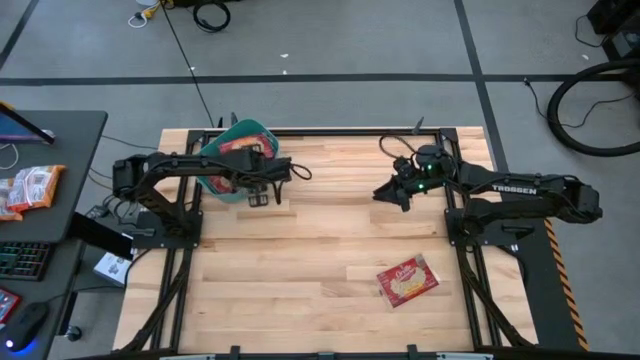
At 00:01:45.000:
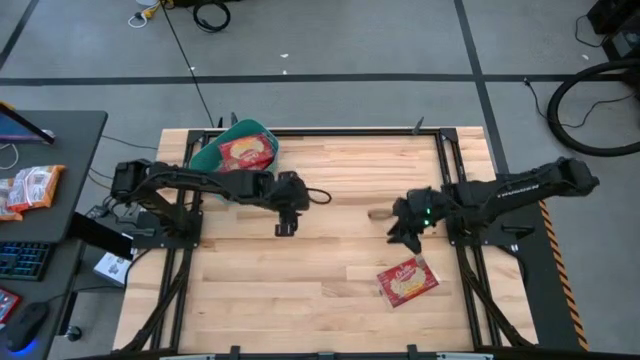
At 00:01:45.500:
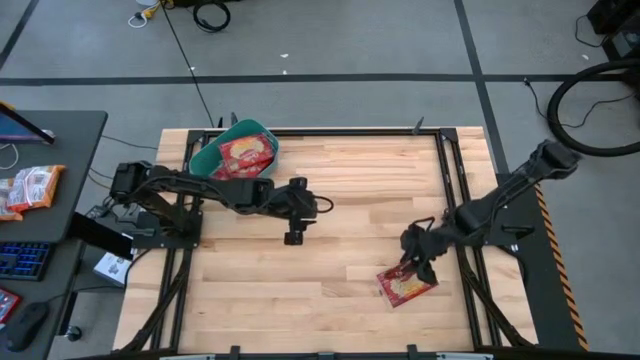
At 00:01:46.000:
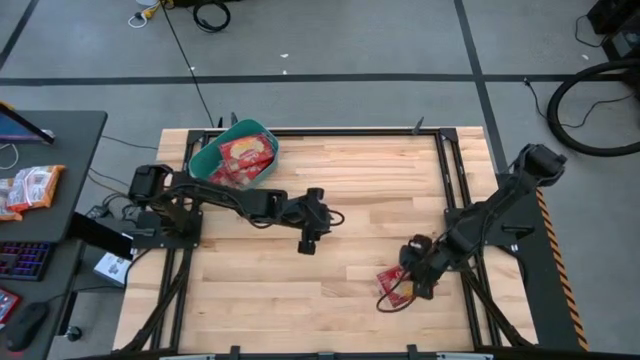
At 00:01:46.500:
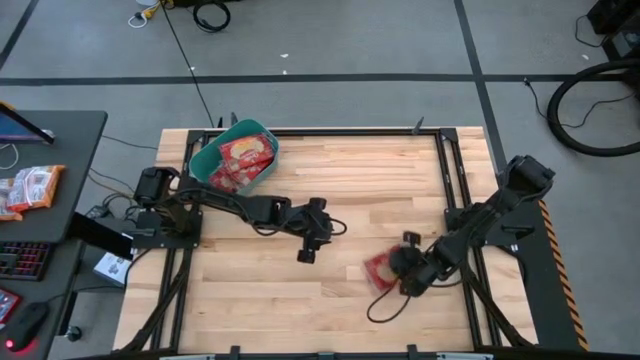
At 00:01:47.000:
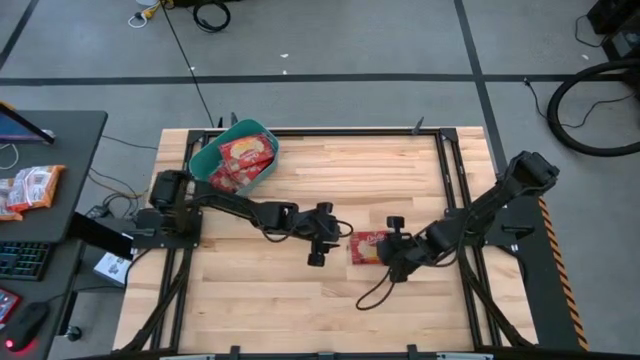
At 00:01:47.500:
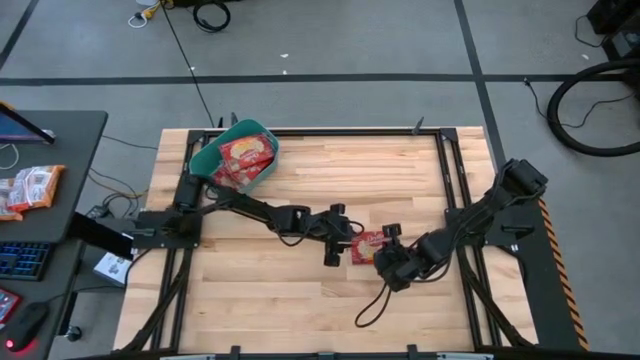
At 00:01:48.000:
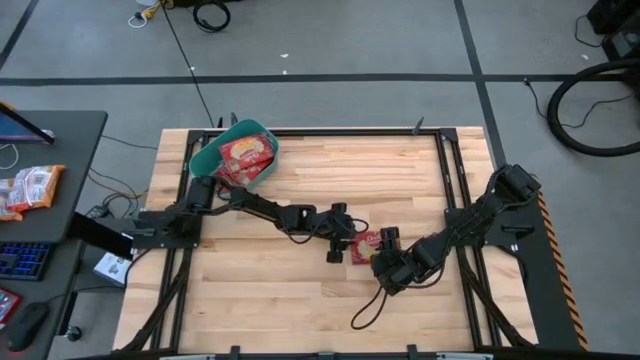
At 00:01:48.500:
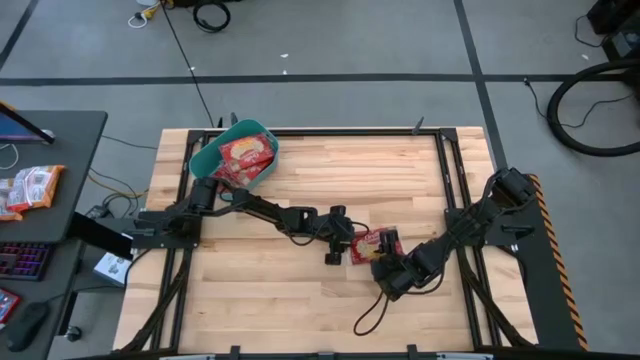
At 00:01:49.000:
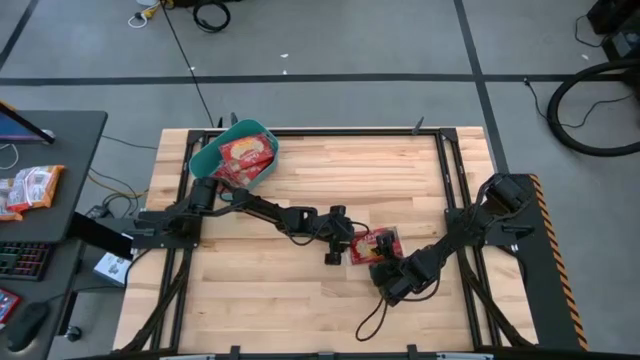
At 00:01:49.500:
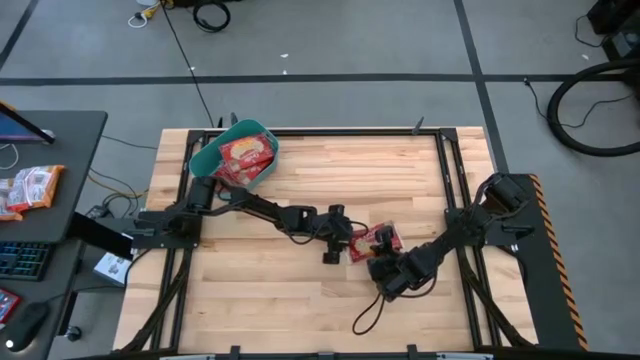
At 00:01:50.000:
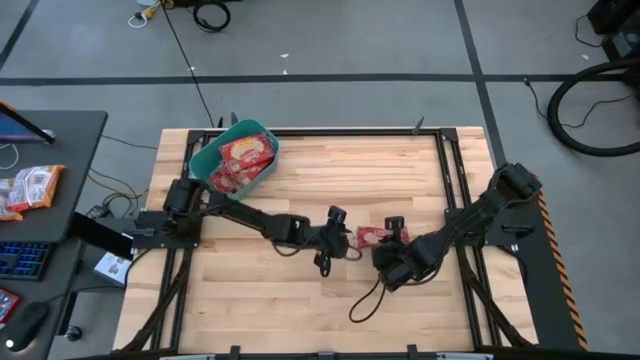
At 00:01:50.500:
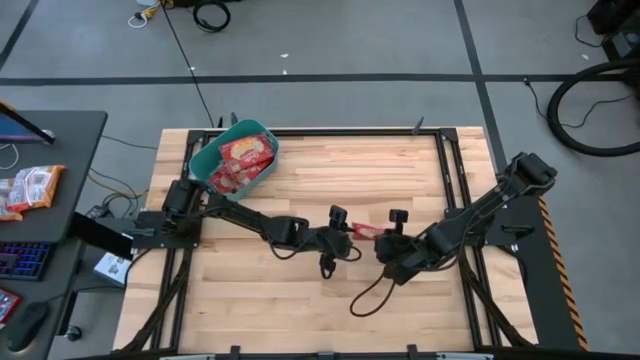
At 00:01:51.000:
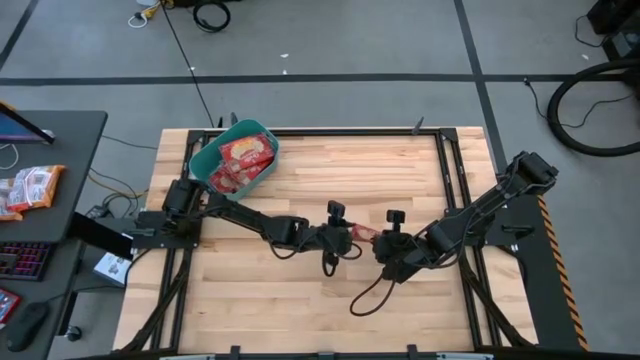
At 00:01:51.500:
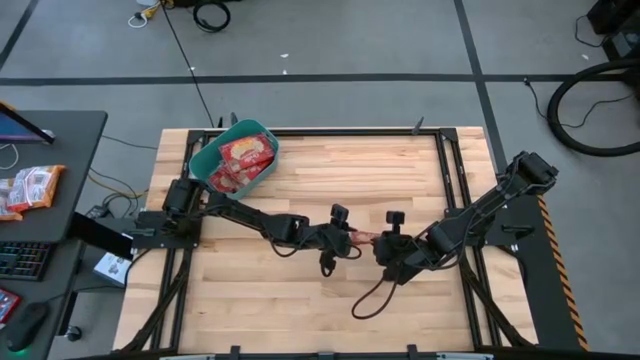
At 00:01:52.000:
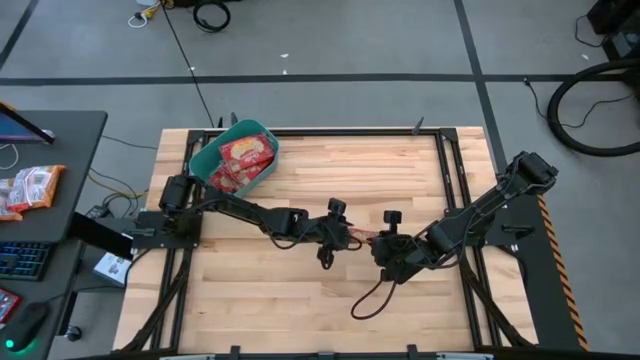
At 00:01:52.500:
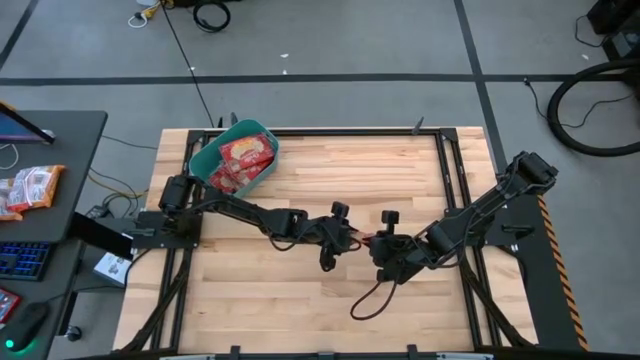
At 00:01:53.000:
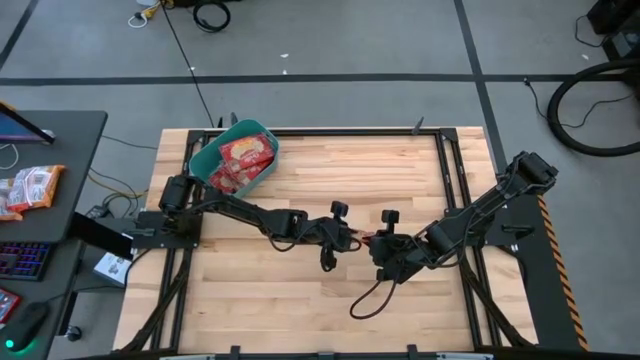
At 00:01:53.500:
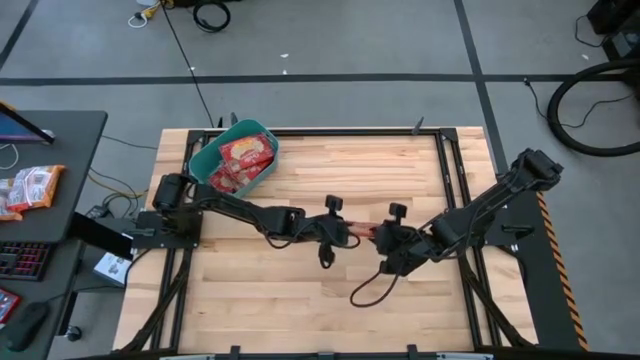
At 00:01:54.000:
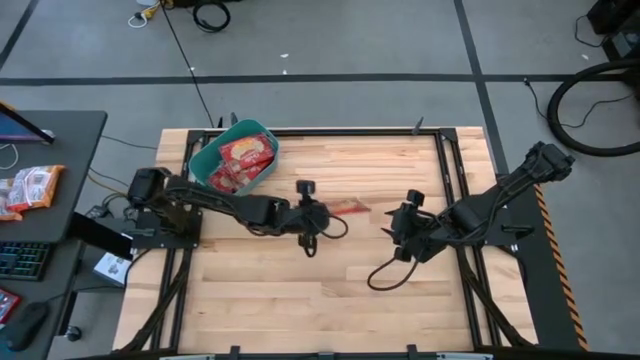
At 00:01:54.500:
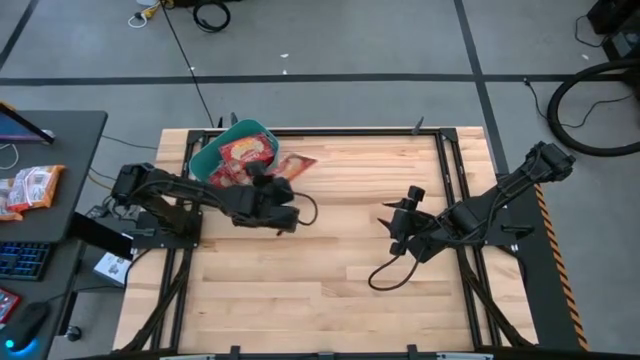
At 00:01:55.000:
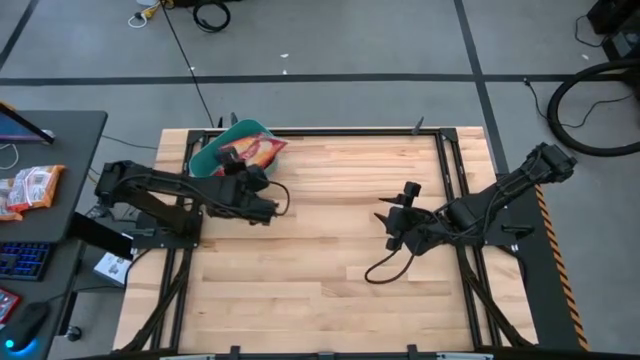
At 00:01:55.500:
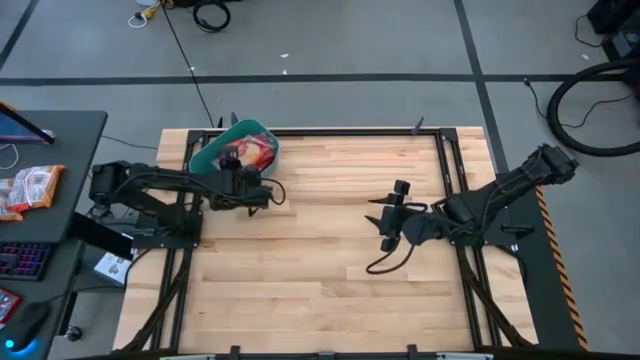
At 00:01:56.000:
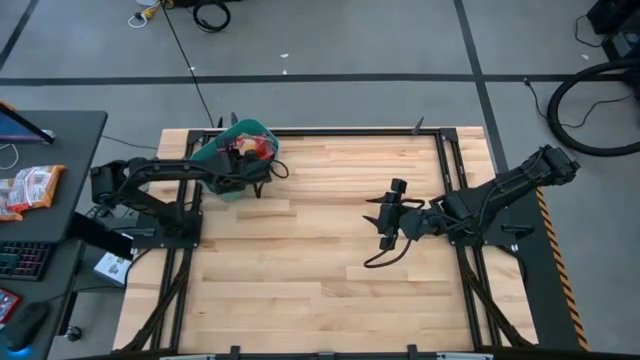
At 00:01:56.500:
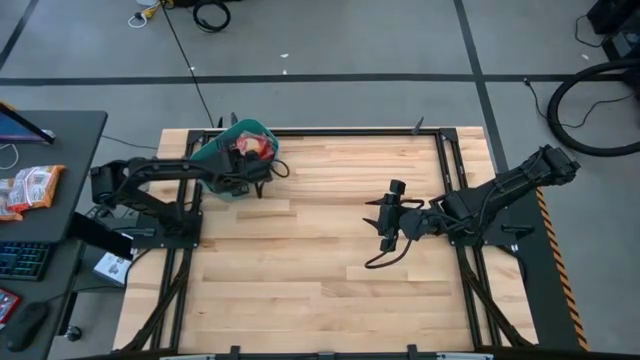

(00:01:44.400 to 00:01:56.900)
Task: Sort popcorn bags into baskets
Put the red popcorn bag into the green bin

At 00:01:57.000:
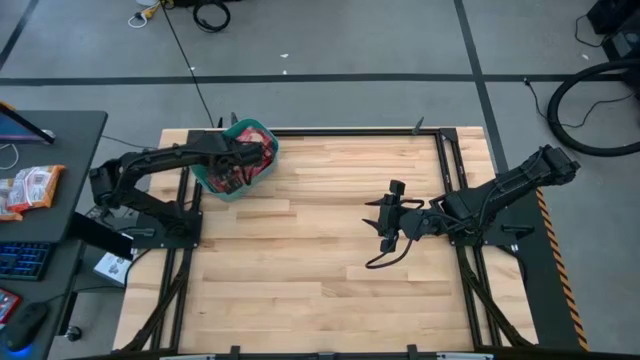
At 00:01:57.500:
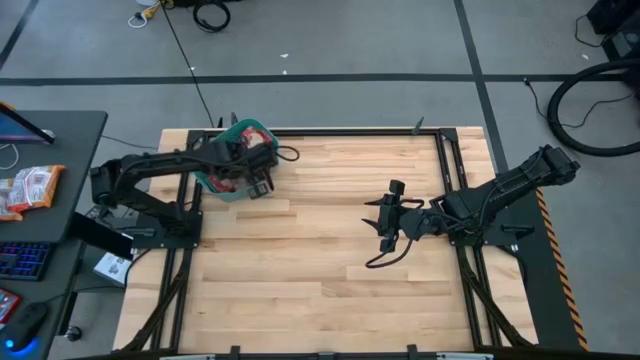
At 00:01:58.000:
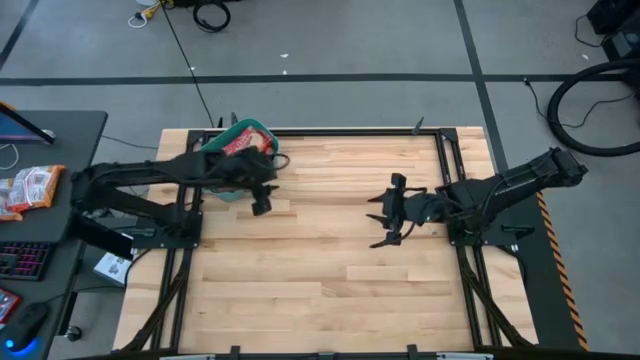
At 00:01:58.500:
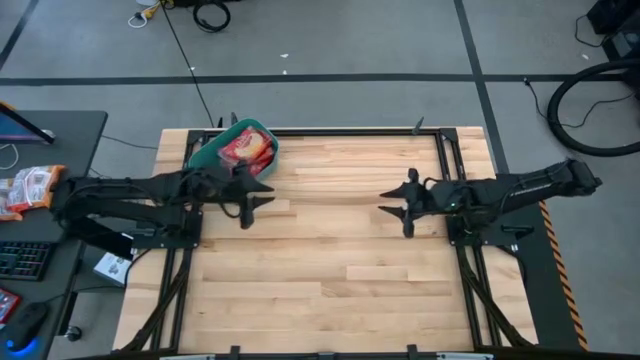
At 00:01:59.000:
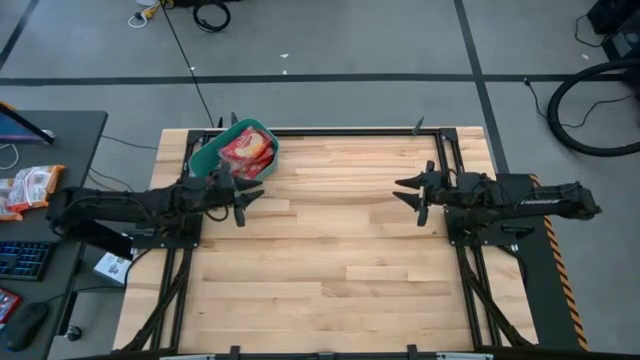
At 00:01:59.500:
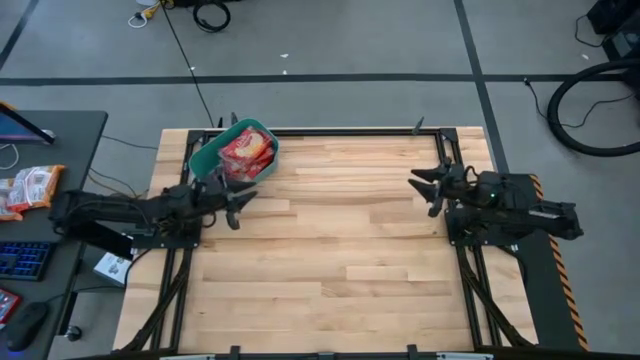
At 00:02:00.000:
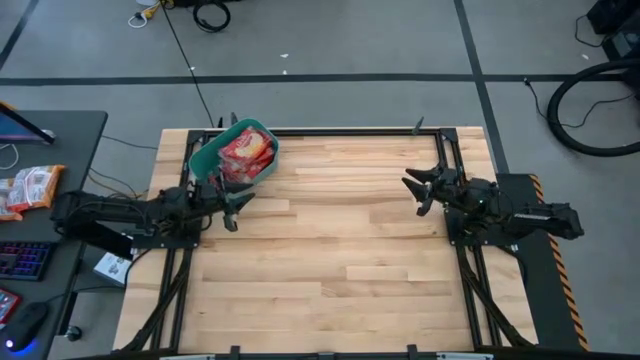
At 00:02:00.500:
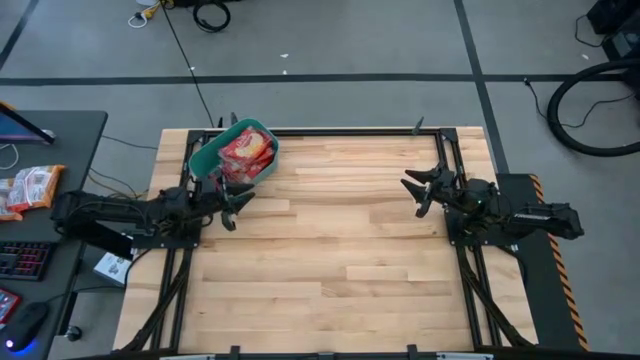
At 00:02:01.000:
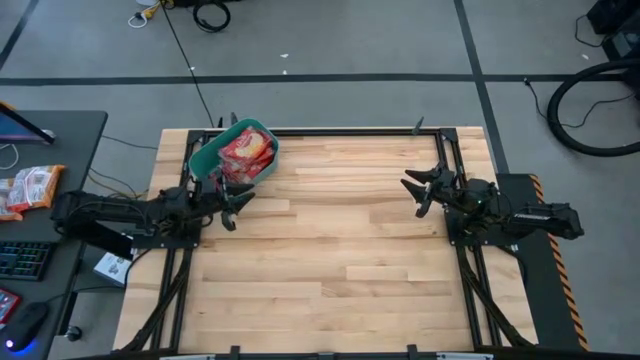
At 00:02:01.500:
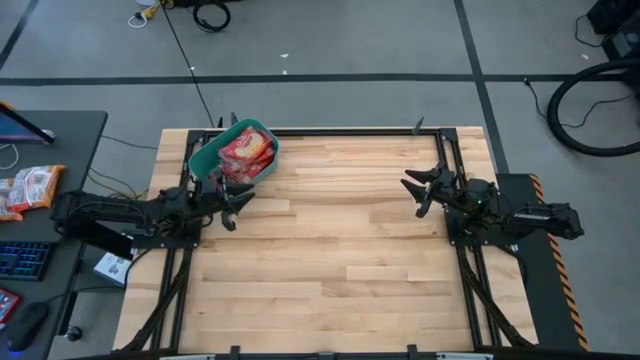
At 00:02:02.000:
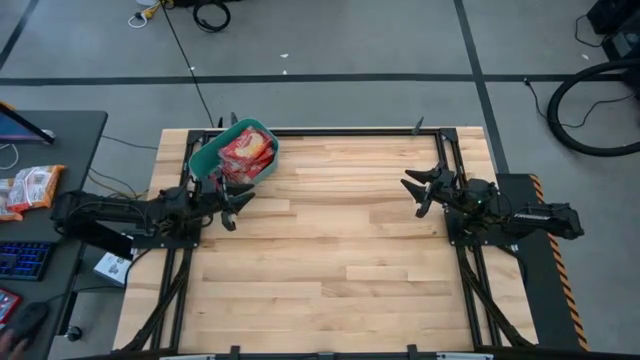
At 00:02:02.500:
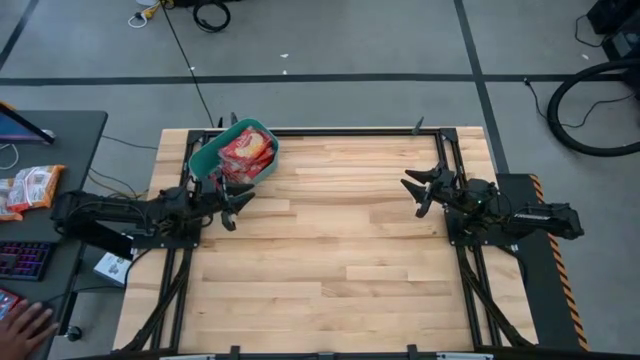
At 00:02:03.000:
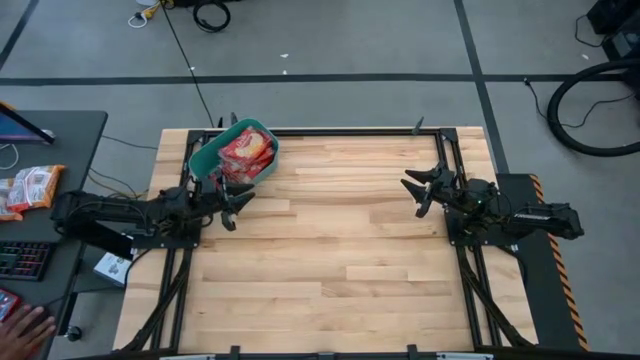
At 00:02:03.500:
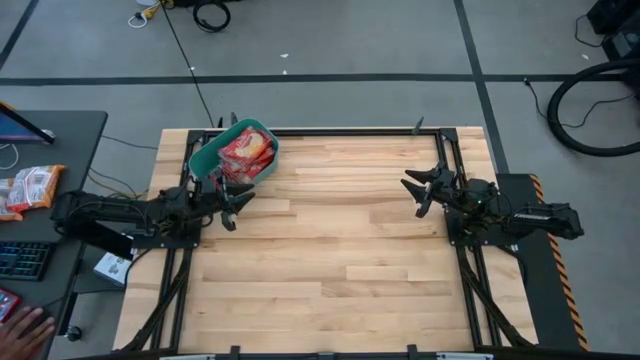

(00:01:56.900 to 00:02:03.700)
Return to Home Position

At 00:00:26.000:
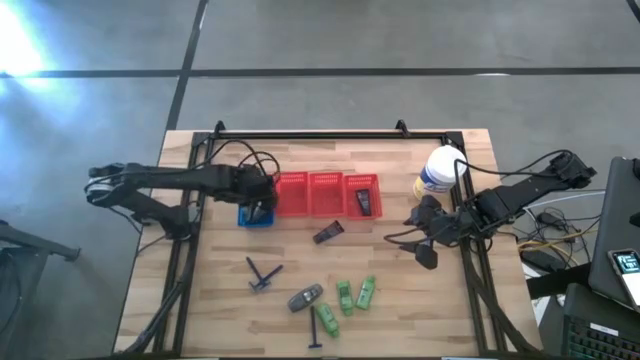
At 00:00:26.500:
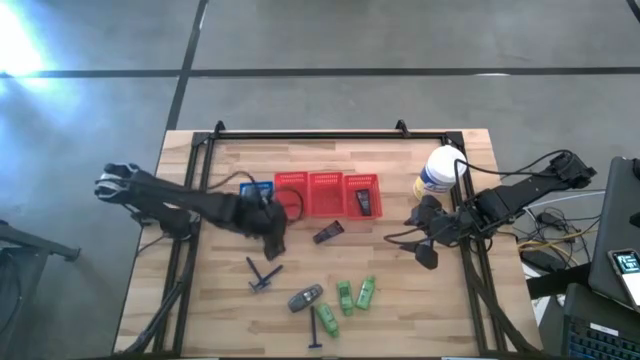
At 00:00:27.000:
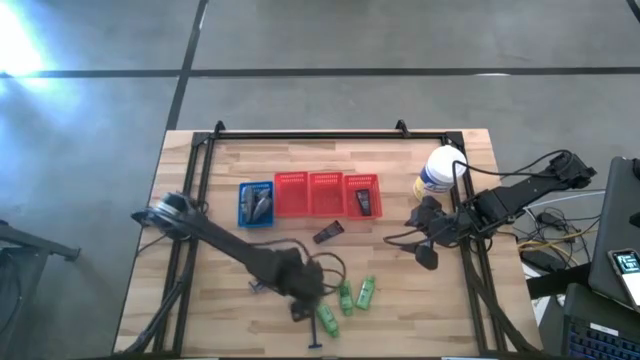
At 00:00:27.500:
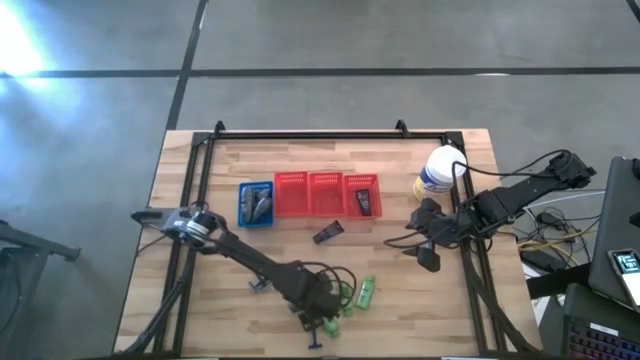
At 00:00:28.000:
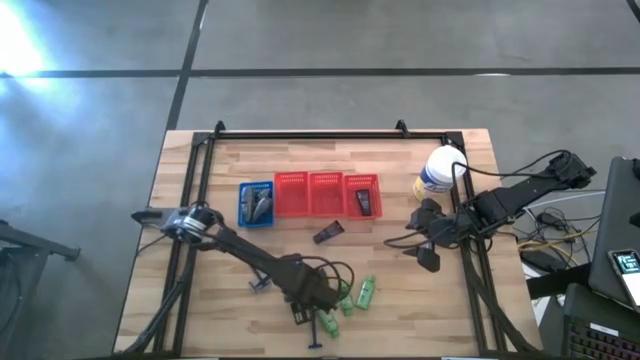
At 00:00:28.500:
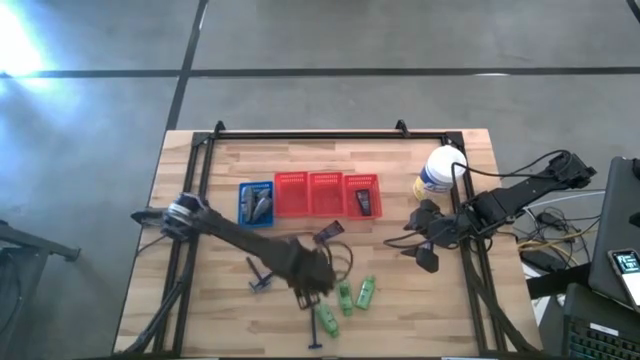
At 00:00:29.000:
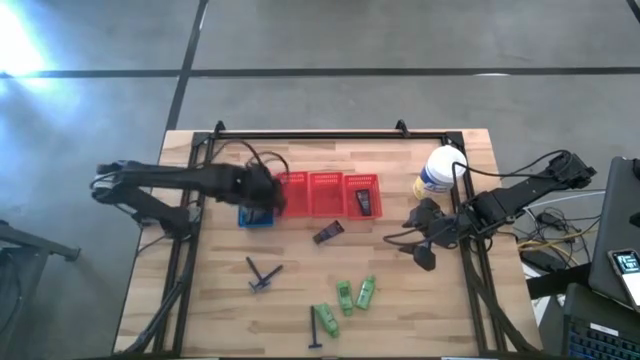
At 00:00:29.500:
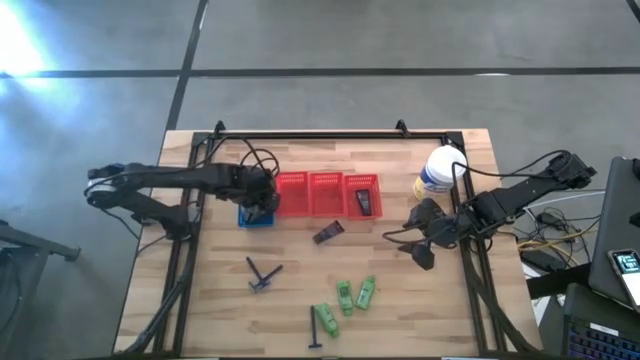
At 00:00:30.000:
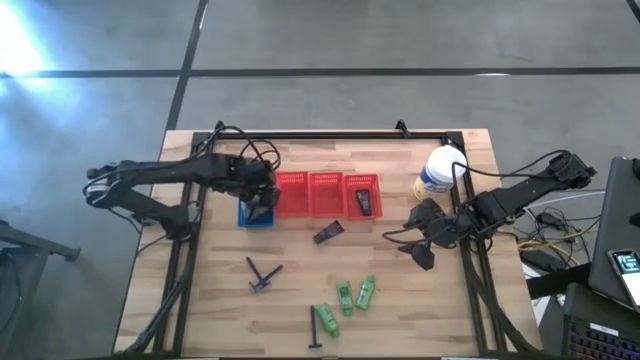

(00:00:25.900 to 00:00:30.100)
Task: Pick & Place Travel size toiletries
Put the gray deodorant into the blue bin
